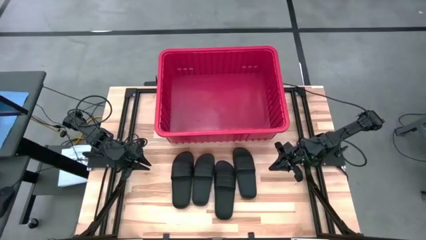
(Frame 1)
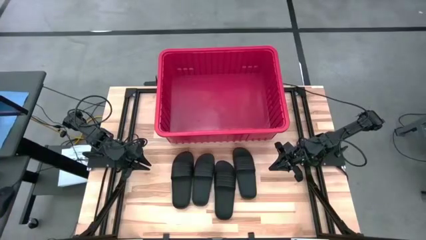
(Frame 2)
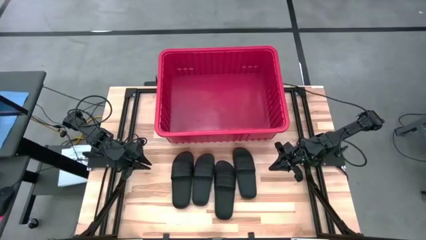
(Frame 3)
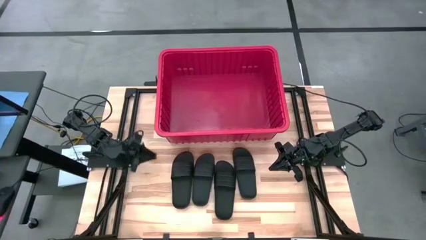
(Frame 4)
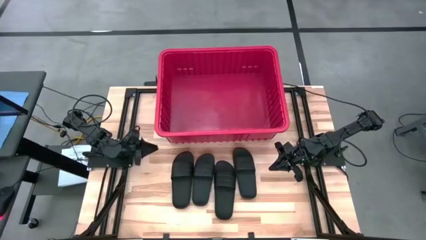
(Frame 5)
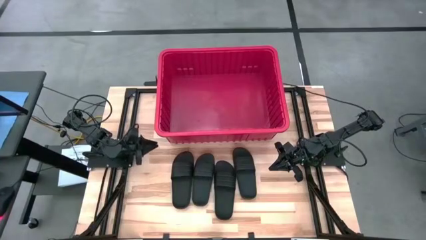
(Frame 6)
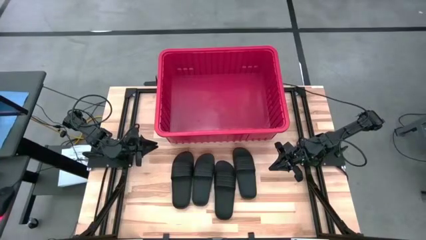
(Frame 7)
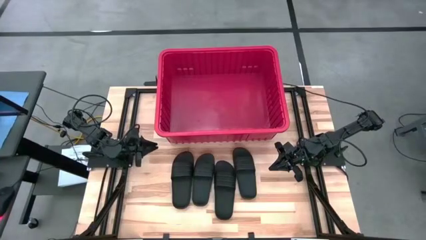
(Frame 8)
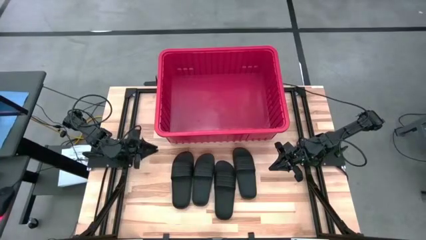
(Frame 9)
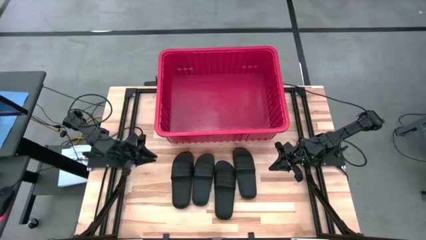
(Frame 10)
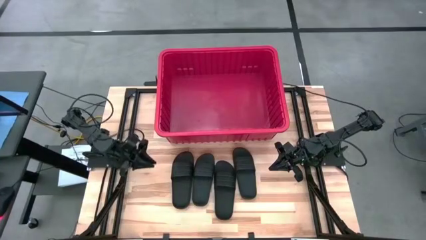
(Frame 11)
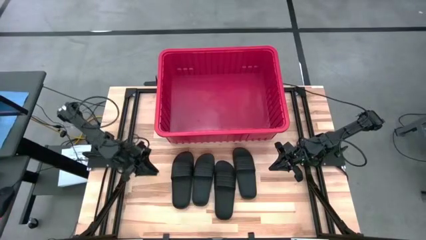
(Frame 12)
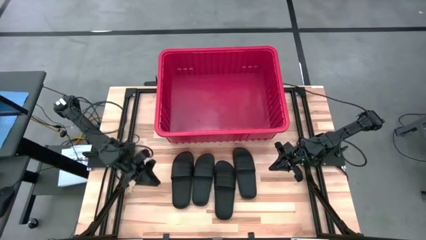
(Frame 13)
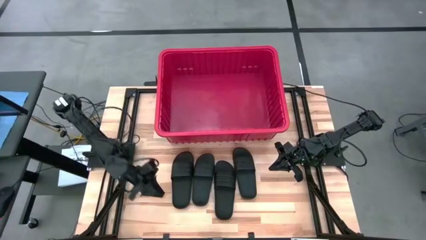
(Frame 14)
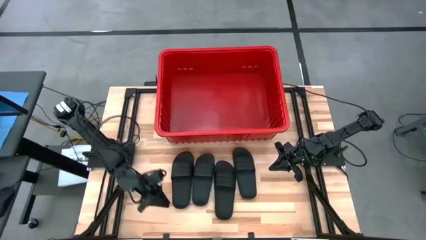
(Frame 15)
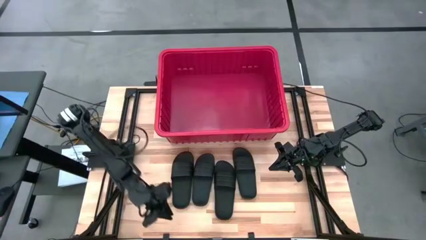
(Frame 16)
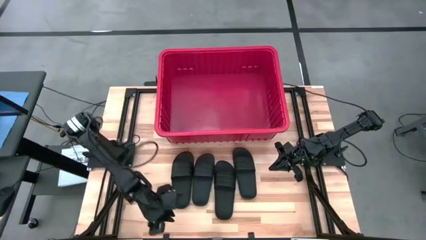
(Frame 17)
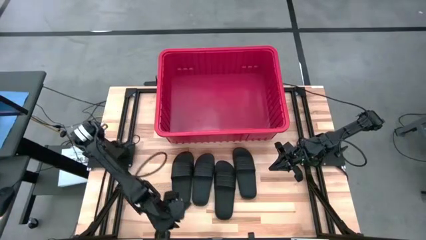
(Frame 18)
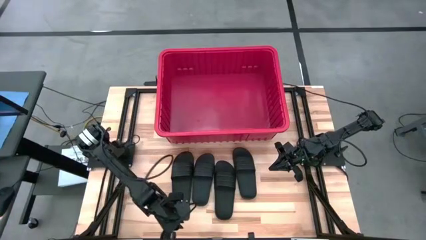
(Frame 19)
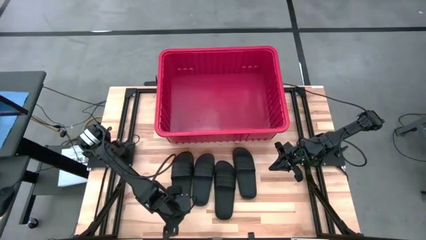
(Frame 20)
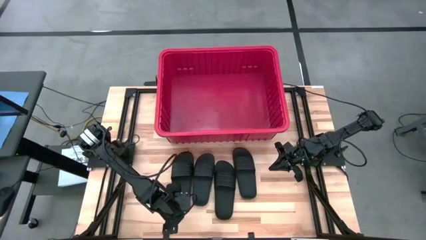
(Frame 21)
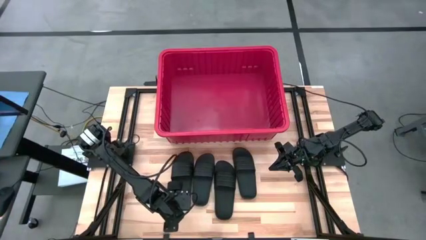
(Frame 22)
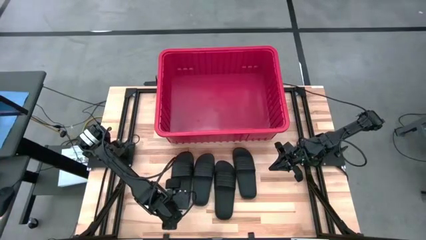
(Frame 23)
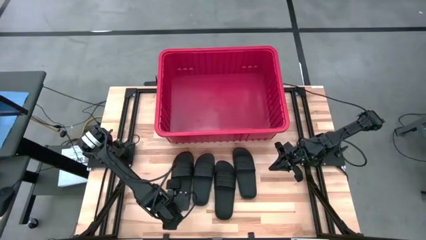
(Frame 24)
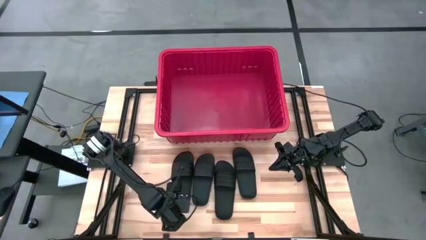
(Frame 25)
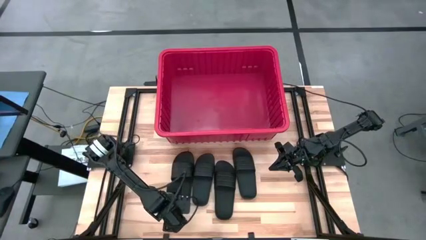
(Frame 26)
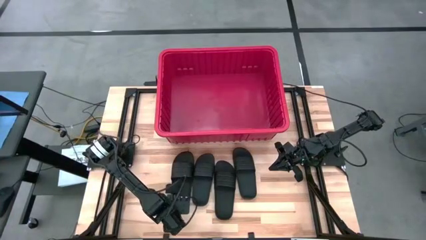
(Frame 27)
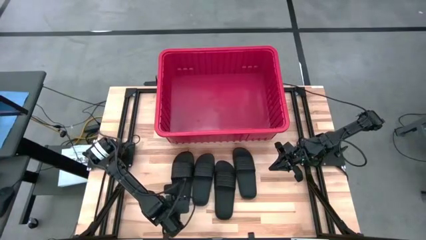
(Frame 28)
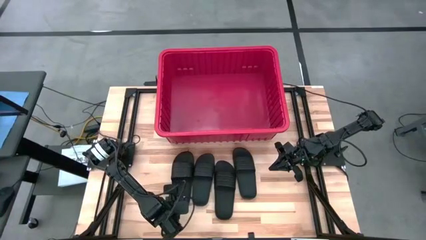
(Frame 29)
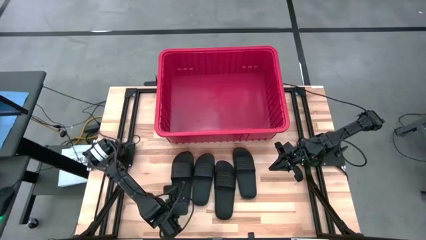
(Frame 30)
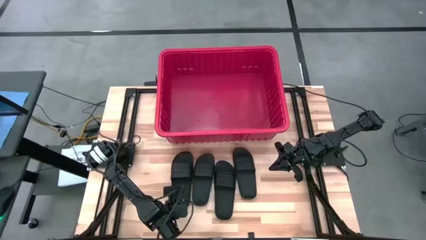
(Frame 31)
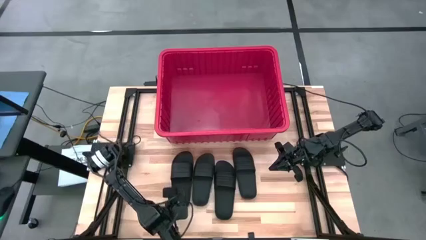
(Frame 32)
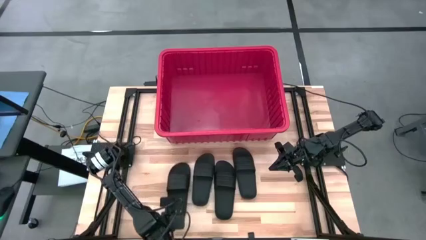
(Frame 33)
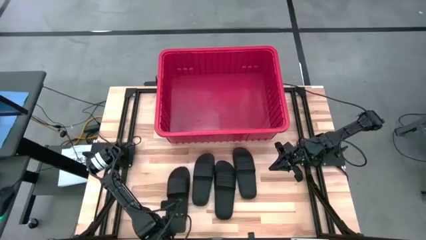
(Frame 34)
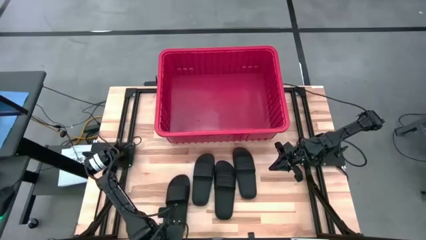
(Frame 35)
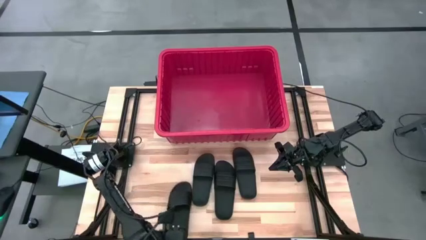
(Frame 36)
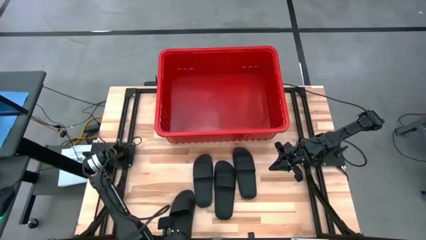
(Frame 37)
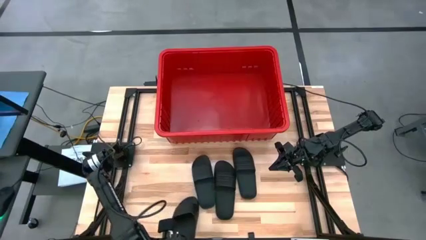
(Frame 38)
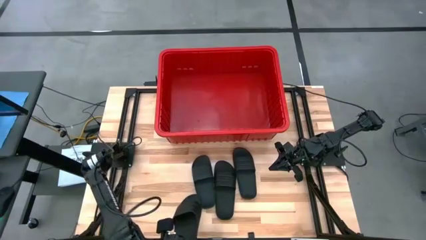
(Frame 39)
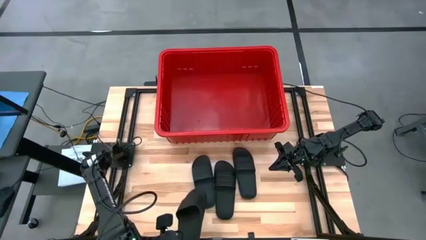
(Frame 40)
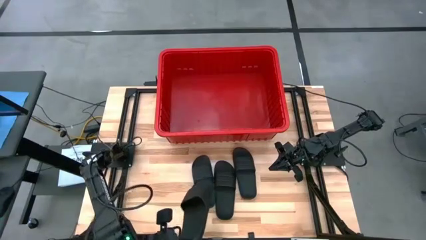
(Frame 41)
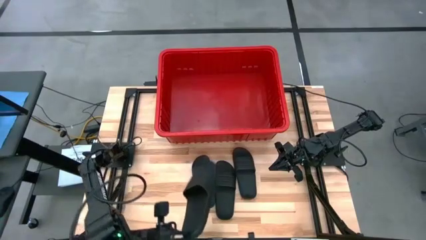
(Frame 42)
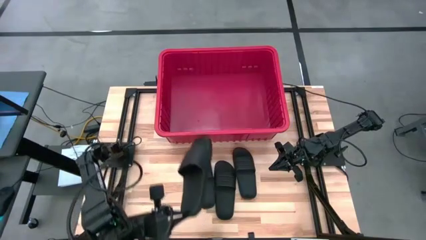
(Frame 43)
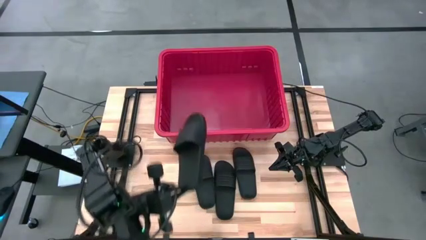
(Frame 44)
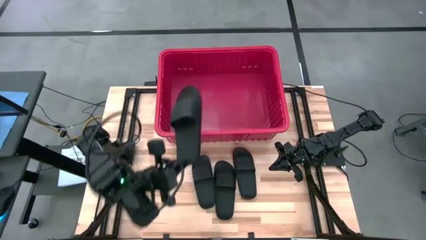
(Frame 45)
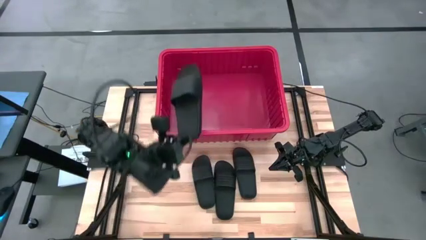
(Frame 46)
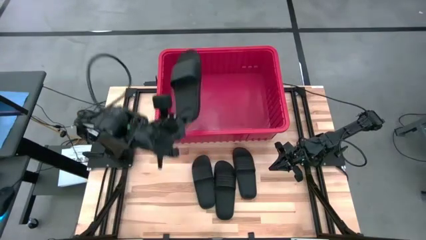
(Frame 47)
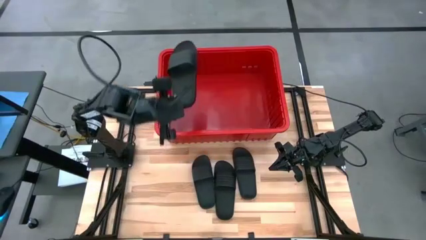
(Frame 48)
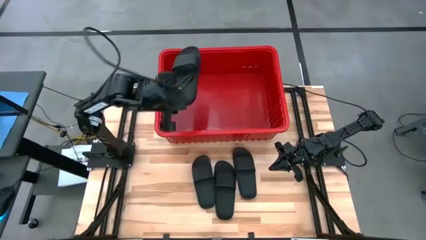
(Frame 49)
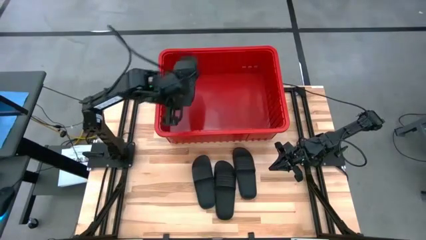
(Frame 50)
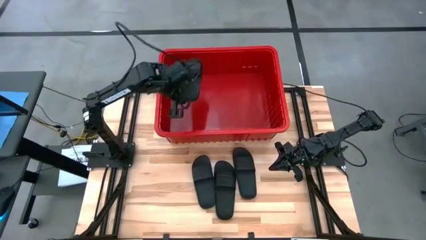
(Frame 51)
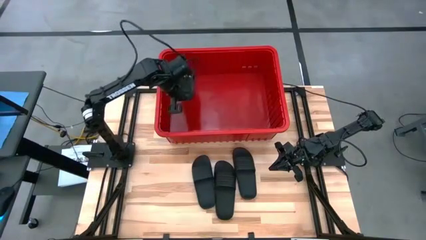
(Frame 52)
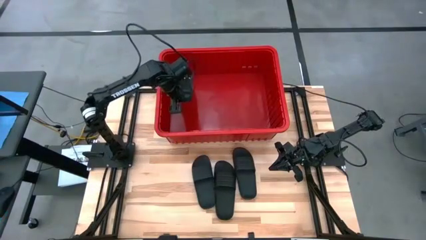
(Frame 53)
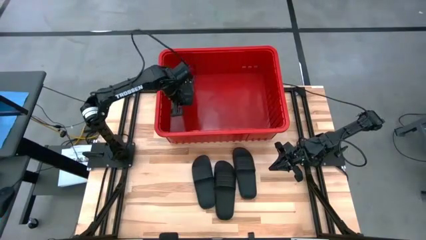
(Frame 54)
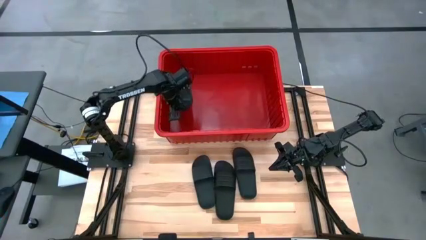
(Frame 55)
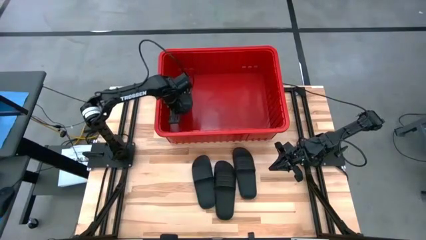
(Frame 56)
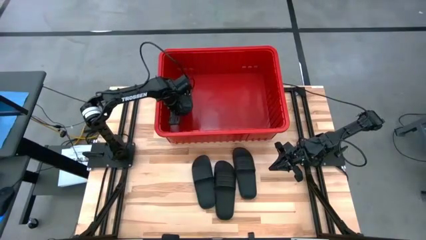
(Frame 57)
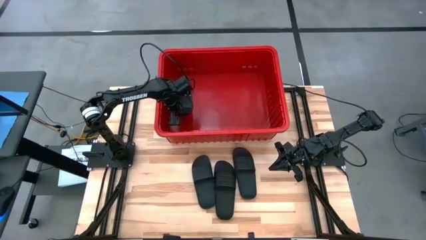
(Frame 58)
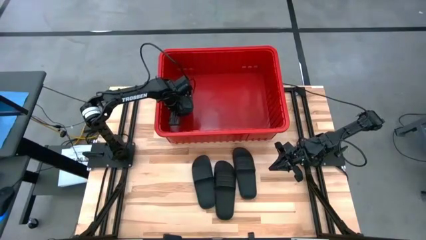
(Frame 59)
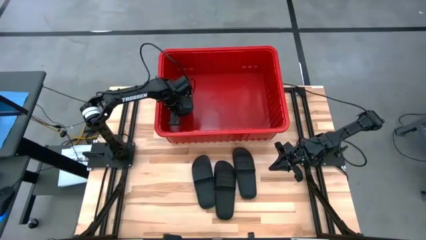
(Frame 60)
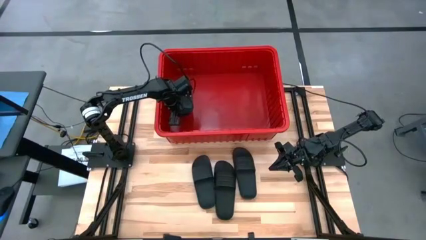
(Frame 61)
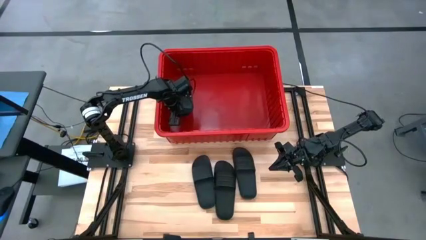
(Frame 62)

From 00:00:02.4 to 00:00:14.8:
Task: Pick and place slides into bin
Put the black slipper into the red bin
